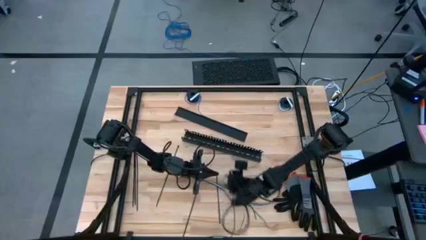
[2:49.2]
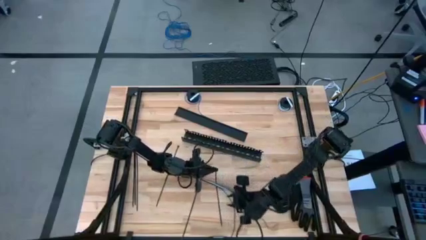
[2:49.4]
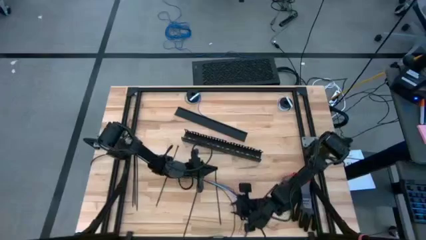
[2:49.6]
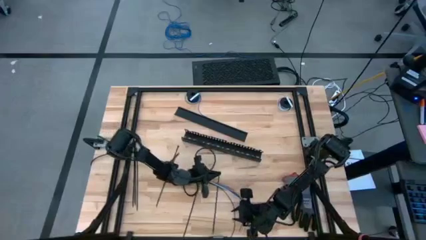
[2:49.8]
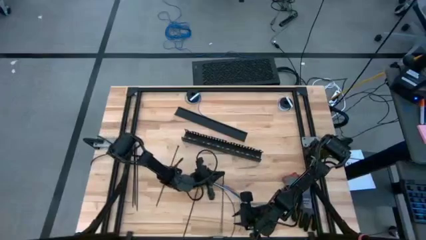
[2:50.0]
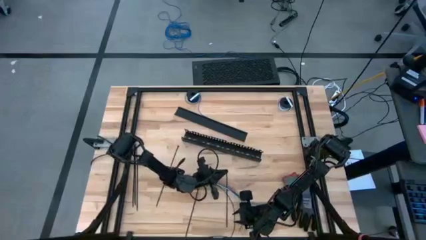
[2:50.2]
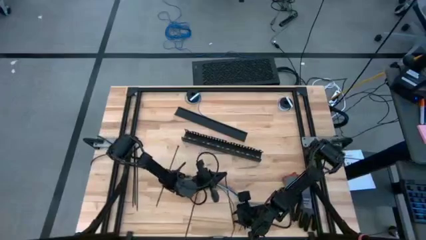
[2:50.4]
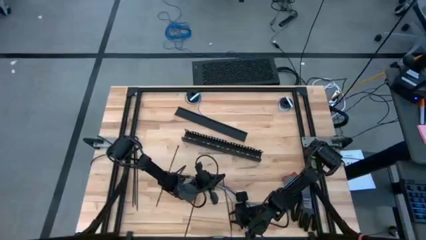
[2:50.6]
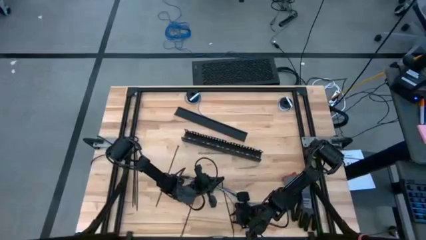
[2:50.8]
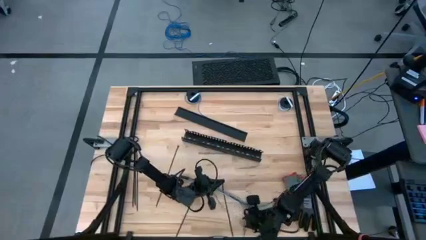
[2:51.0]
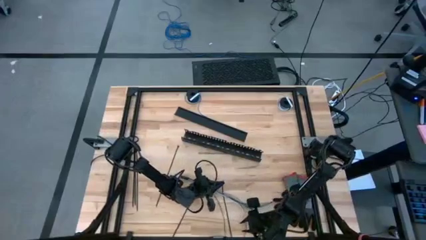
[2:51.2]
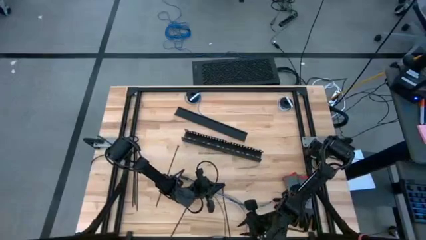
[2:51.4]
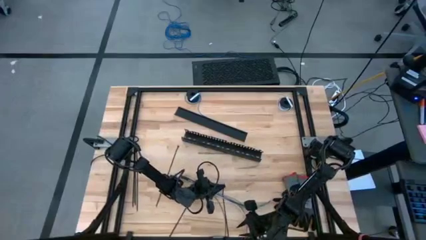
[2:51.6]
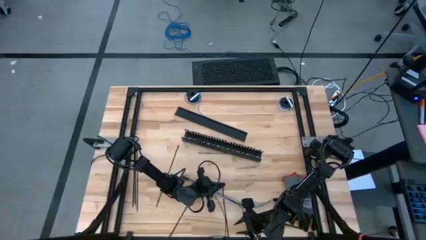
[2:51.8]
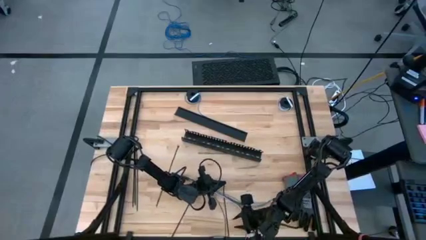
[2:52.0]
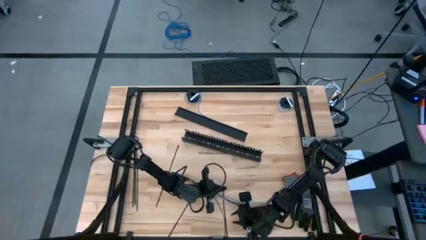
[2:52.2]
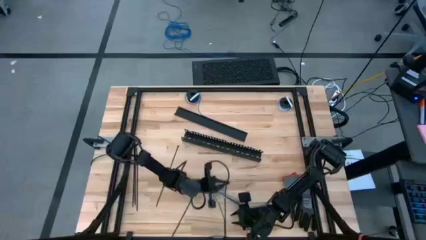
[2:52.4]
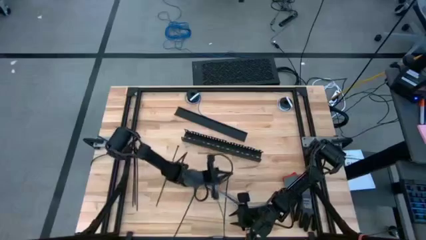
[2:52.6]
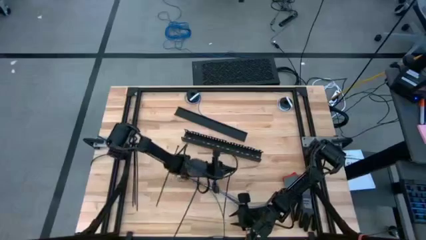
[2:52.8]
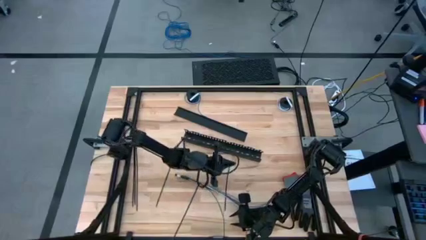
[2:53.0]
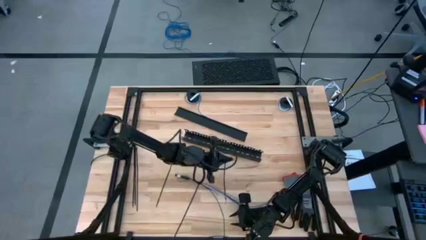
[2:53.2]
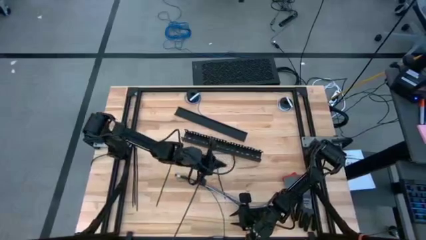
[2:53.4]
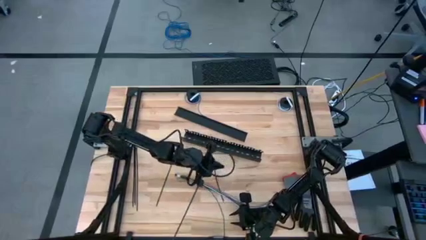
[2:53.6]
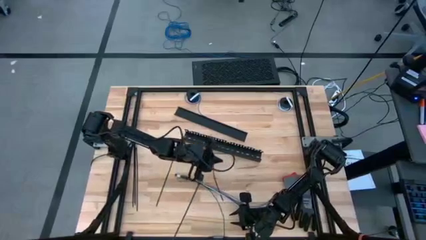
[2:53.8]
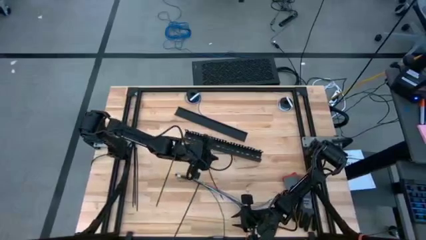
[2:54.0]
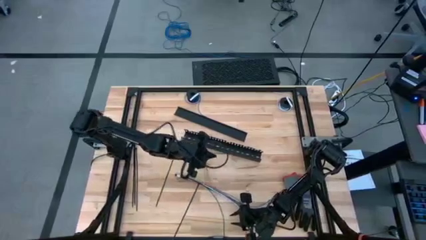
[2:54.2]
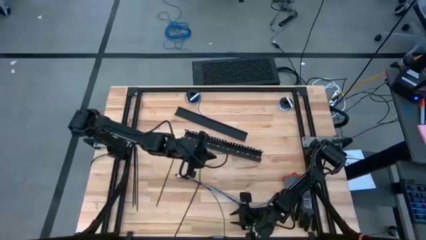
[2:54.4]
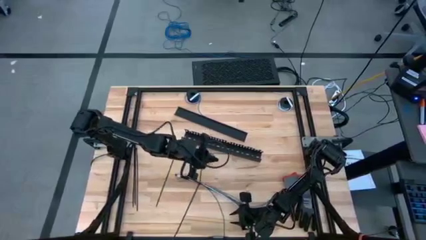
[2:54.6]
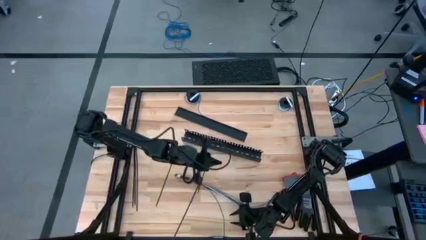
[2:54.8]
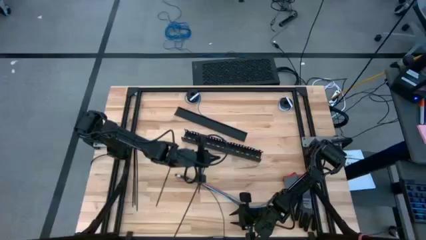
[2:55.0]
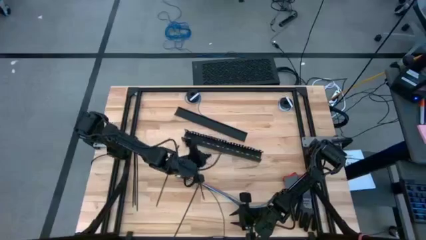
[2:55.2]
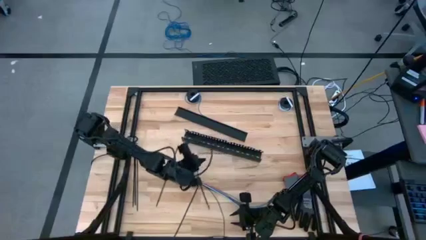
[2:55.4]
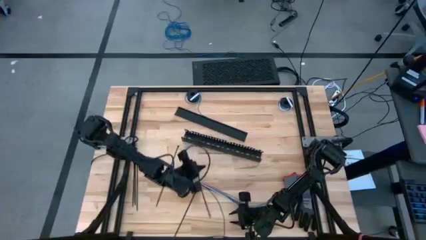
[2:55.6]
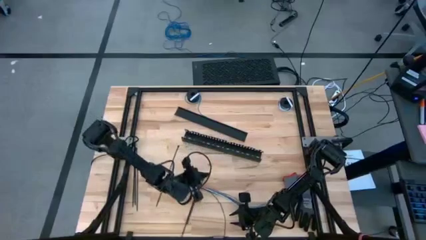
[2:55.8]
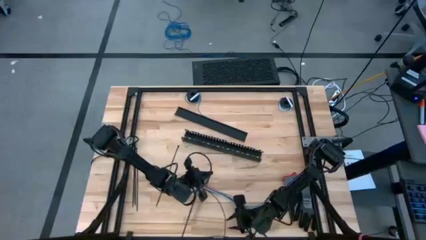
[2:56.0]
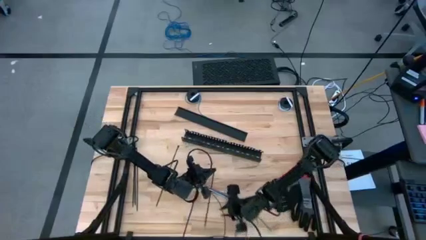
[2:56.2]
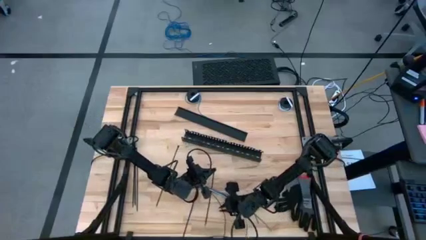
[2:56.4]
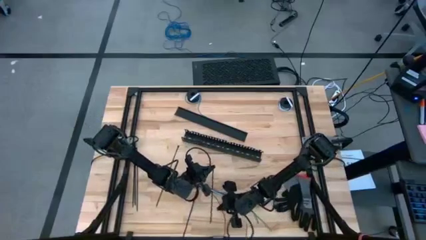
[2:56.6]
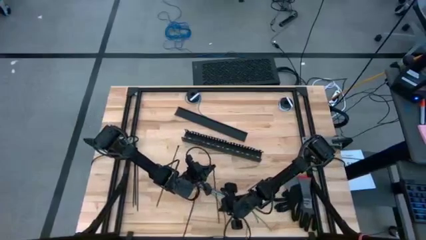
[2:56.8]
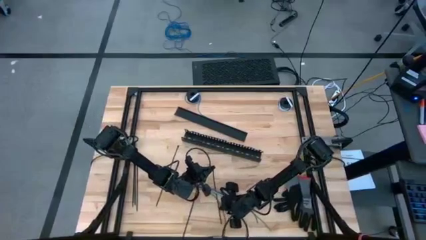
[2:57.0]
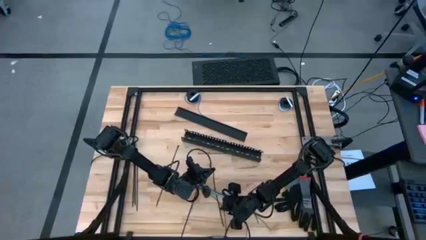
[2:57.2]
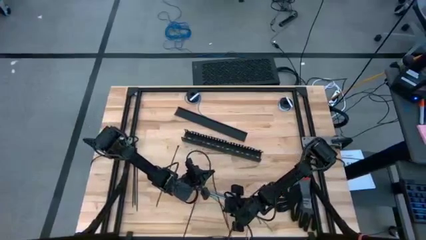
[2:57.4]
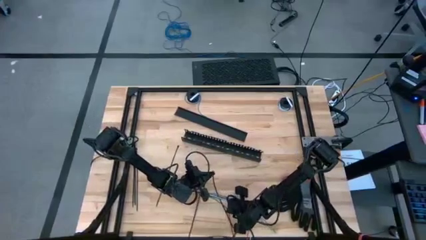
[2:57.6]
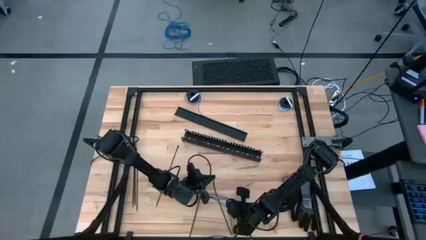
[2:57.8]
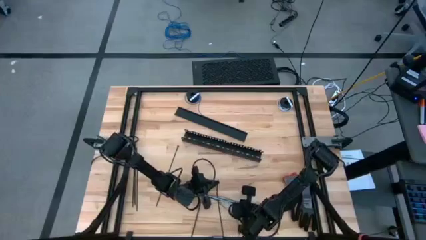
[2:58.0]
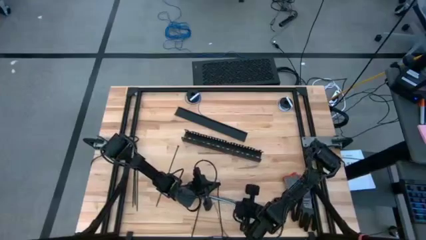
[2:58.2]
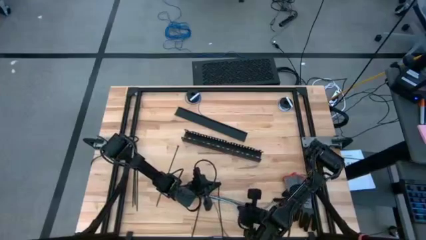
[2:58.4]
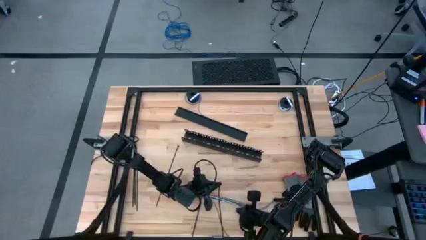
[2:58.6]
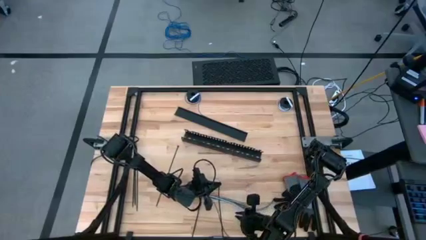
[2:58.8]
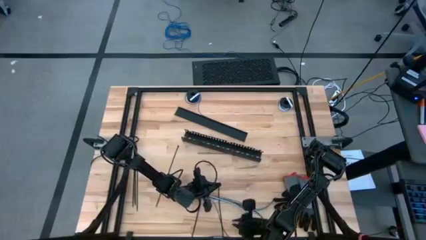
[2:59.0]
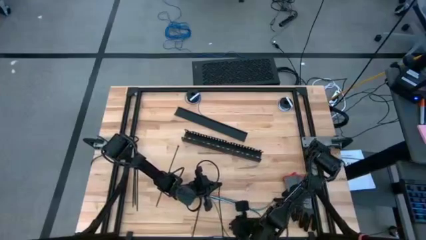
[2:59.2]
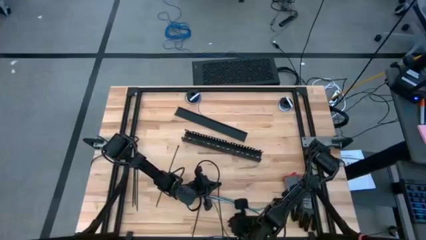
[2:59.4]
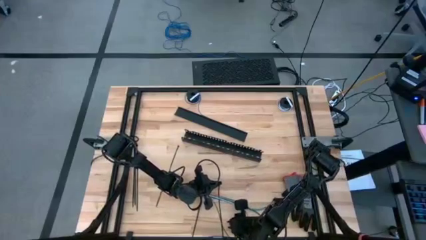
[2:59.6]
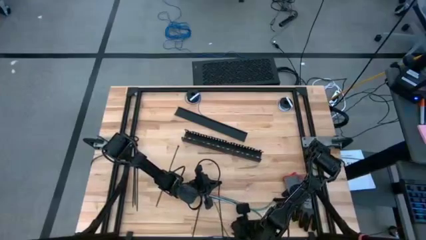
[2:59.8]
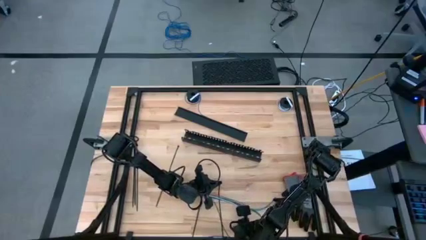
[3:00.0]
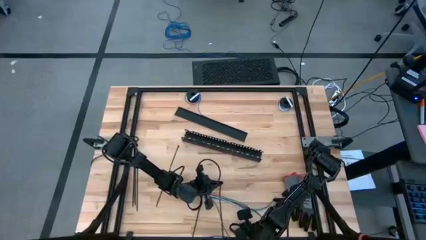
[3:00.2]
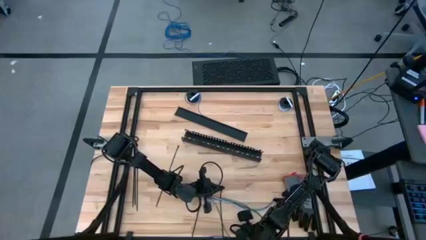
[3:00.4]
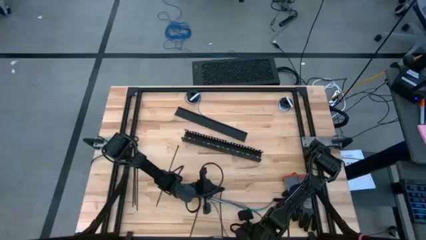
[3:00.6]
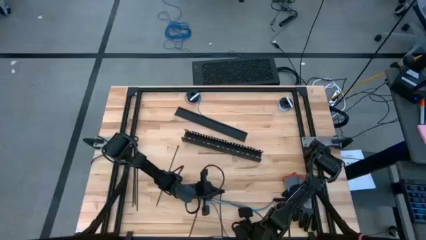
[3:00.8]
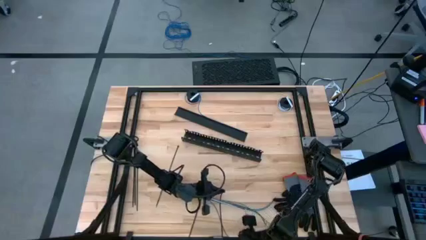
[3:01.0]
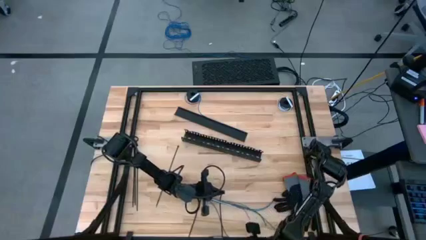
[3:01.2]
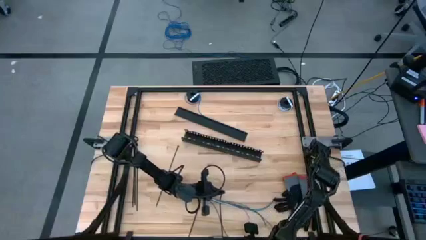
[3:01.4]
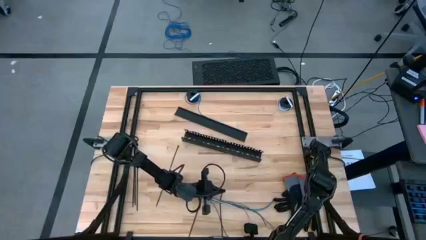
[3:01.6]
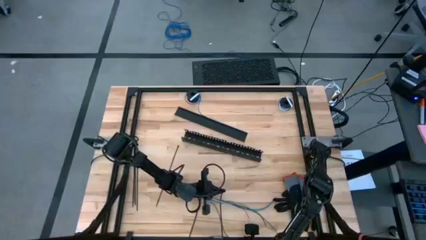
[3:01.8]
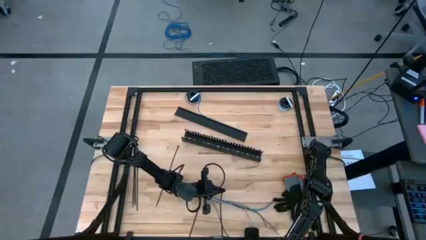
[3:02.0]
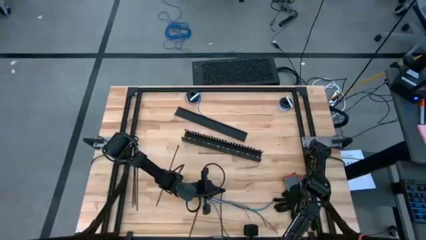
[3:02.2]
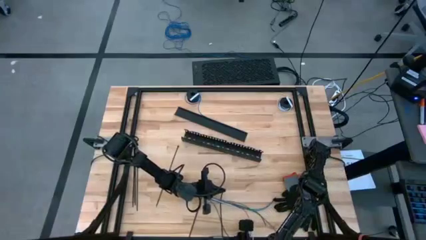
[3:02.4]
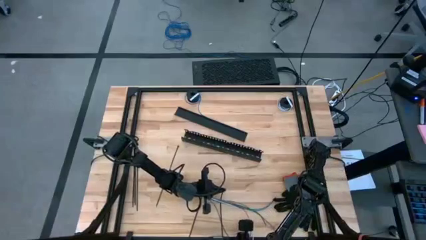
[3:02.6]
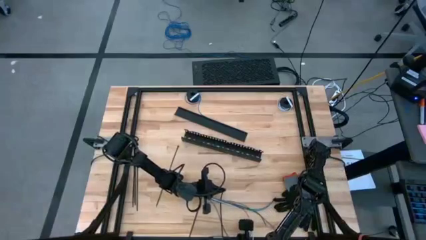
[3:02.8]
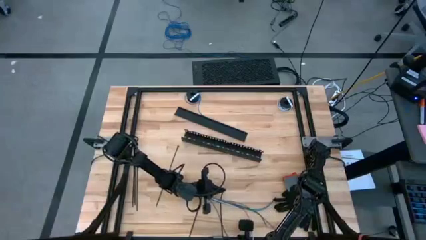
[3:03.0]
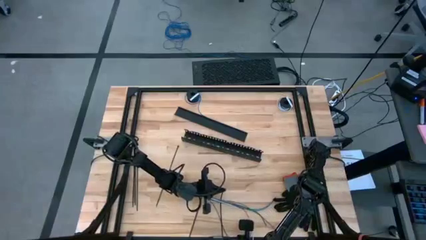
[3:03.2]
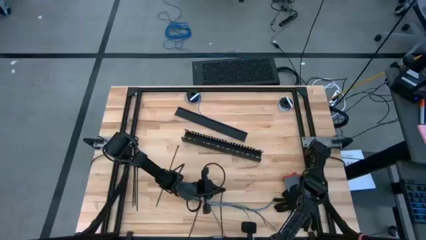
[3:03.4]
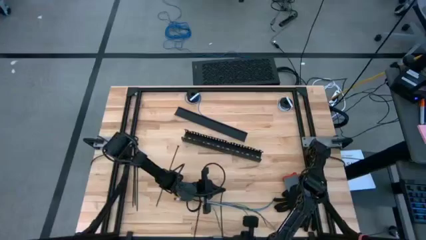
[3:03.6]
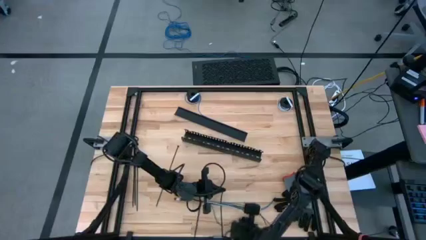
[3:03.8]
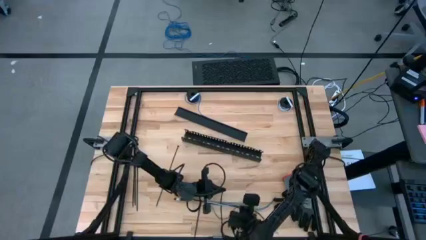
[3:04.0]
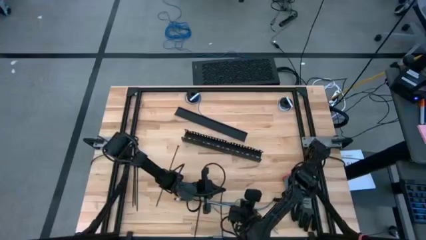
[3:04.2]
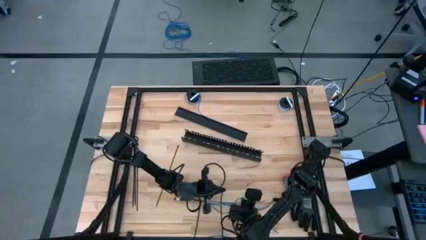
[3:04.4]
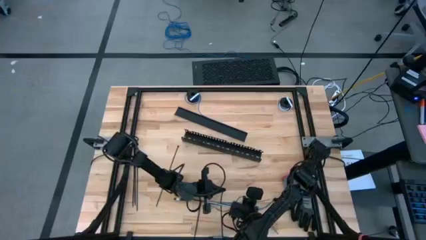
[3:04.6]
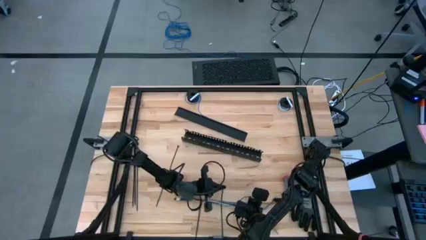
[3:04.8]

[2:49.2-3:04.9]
Task: Ziptie cables
Wrap the cable wires with the black zip tie
